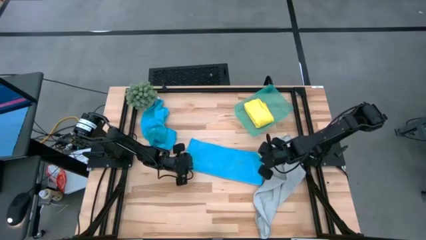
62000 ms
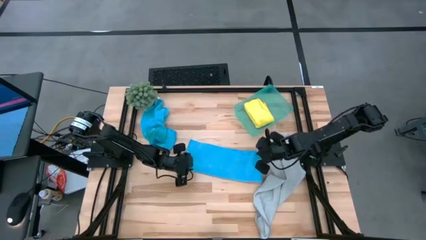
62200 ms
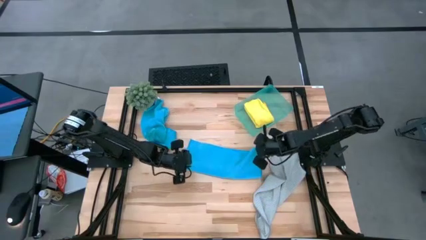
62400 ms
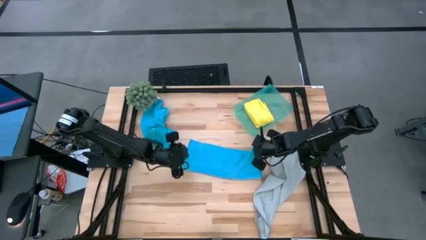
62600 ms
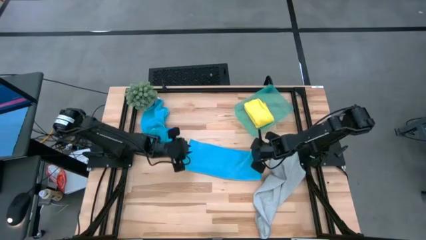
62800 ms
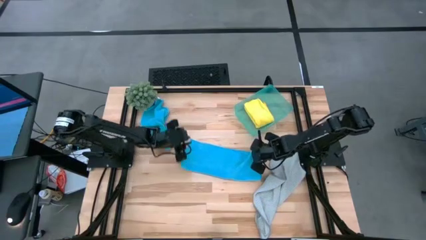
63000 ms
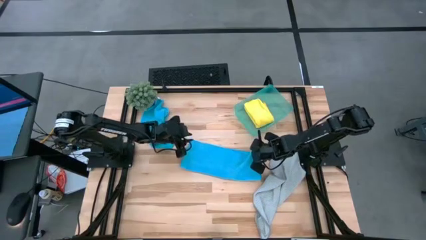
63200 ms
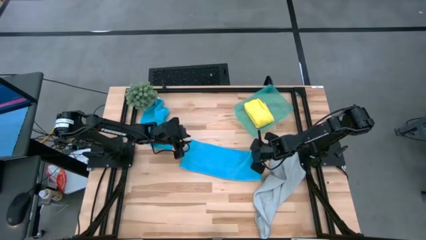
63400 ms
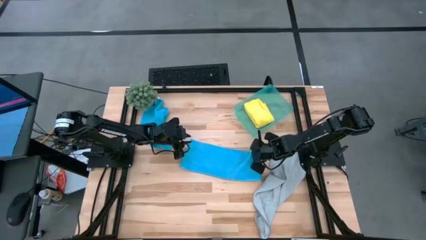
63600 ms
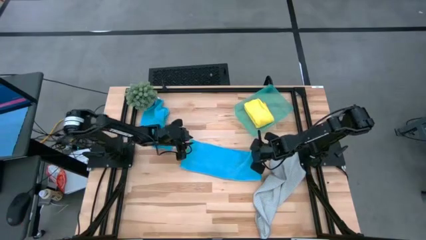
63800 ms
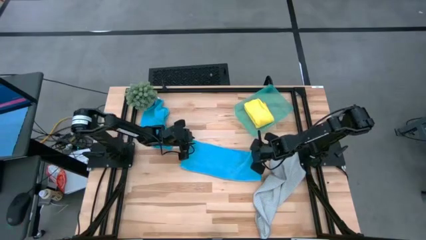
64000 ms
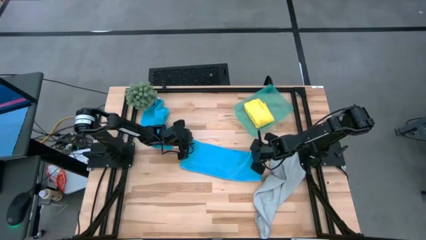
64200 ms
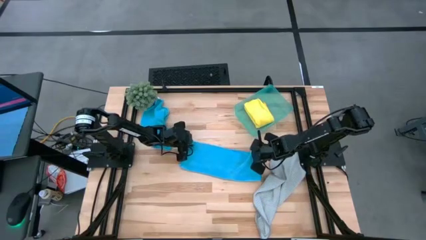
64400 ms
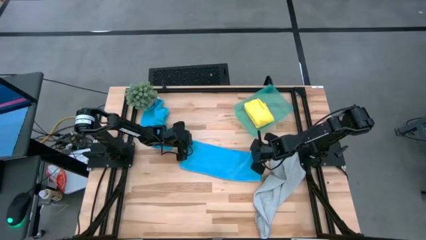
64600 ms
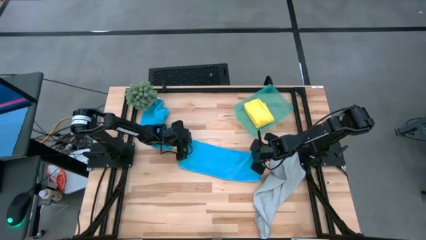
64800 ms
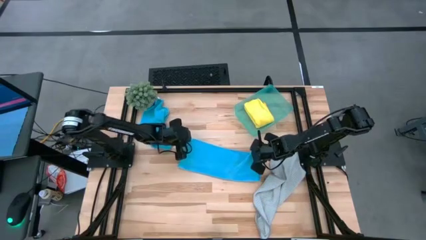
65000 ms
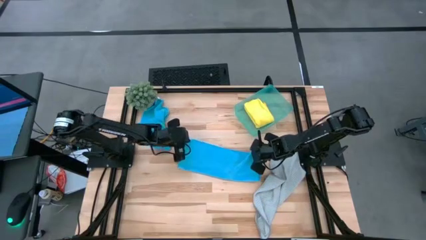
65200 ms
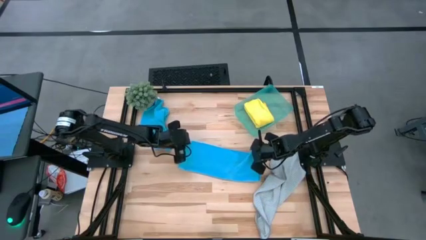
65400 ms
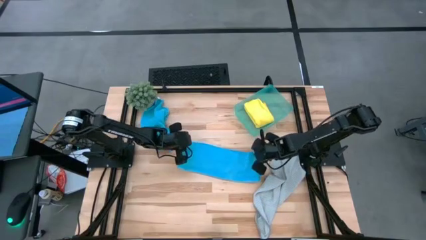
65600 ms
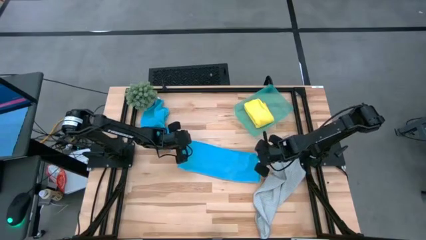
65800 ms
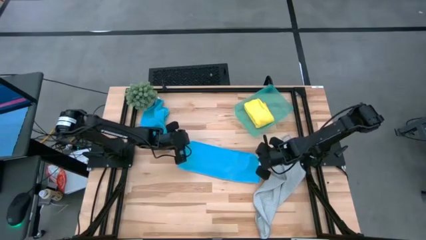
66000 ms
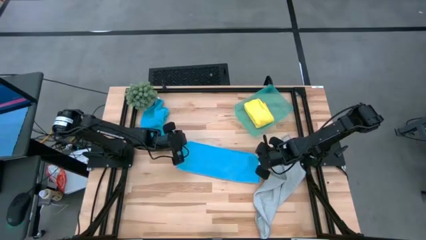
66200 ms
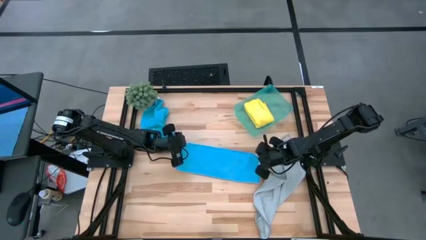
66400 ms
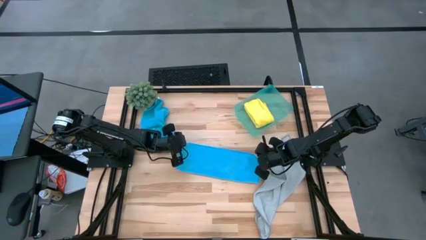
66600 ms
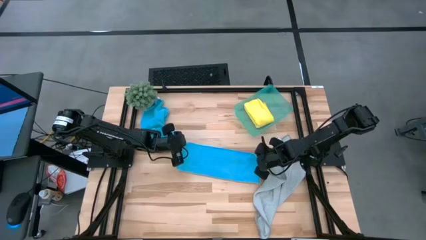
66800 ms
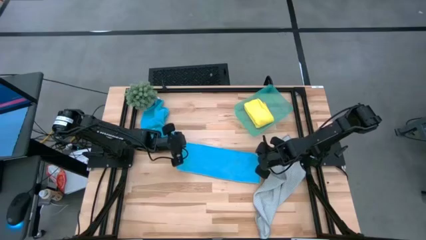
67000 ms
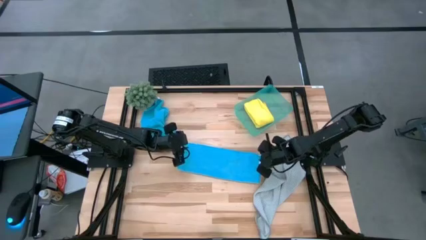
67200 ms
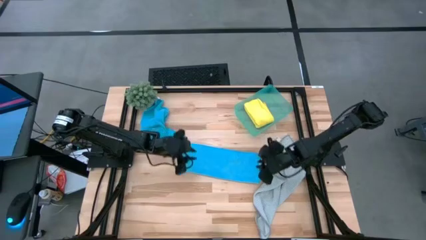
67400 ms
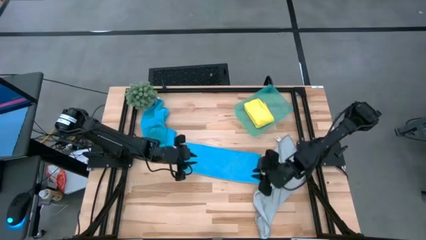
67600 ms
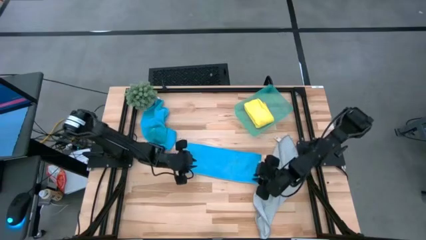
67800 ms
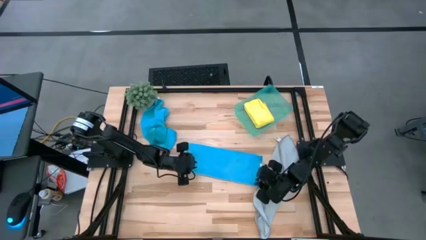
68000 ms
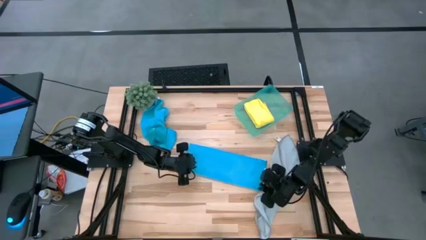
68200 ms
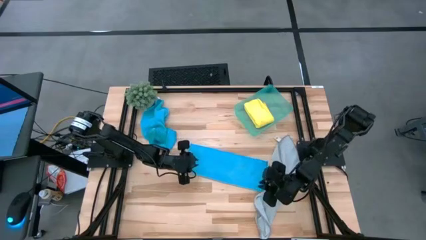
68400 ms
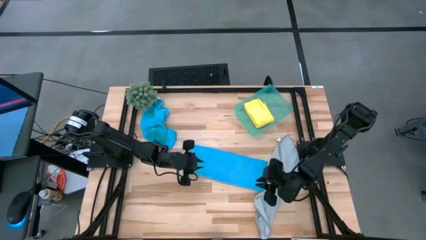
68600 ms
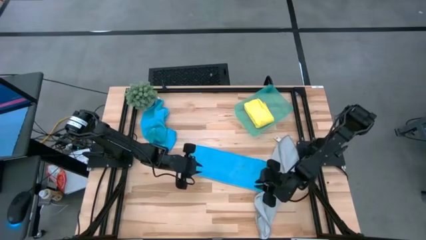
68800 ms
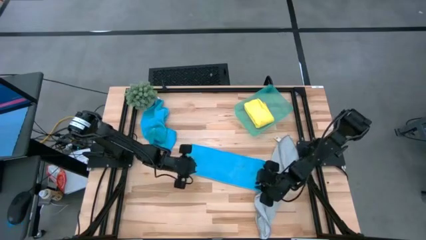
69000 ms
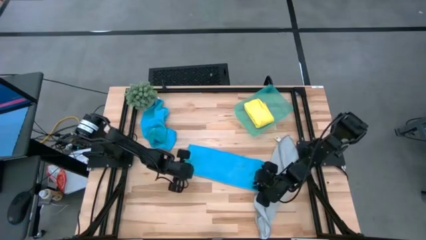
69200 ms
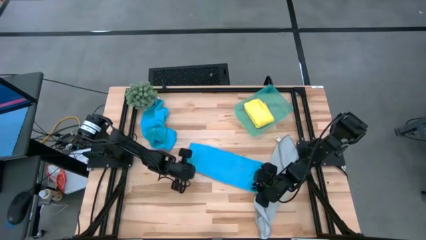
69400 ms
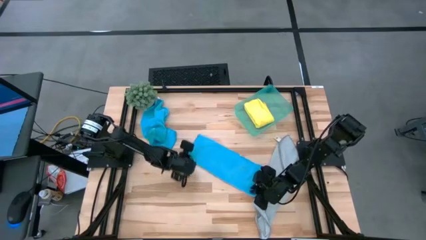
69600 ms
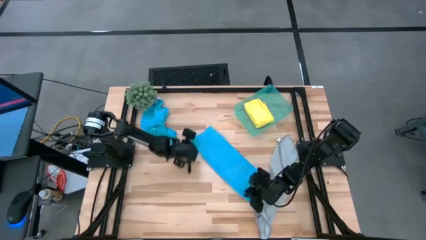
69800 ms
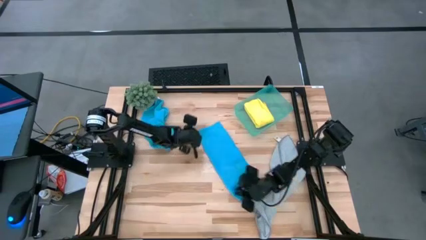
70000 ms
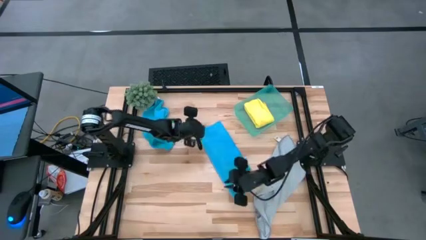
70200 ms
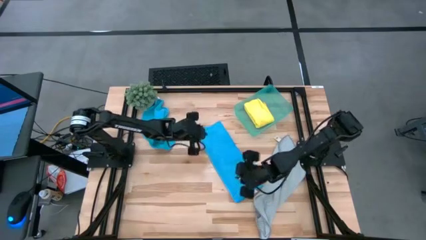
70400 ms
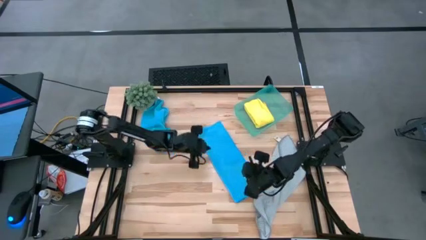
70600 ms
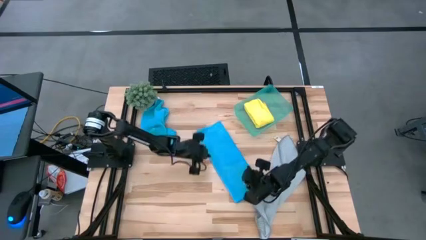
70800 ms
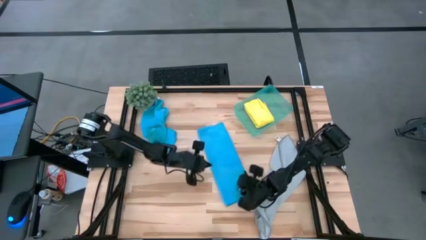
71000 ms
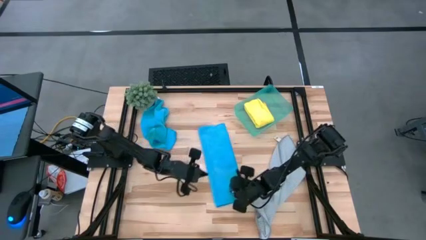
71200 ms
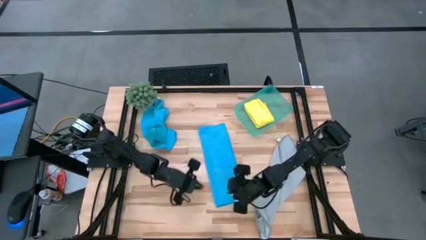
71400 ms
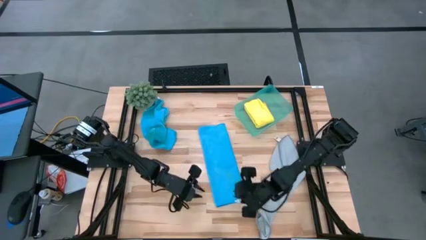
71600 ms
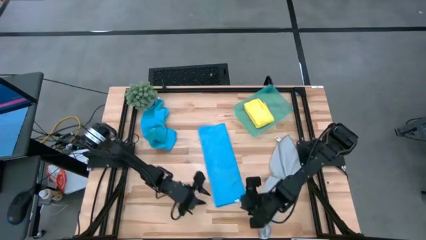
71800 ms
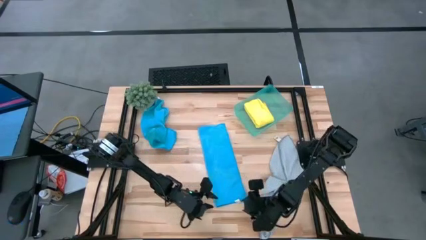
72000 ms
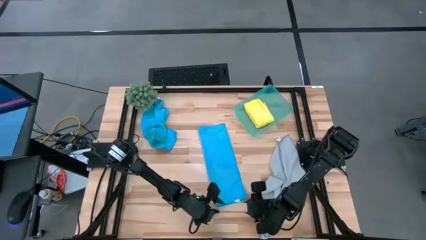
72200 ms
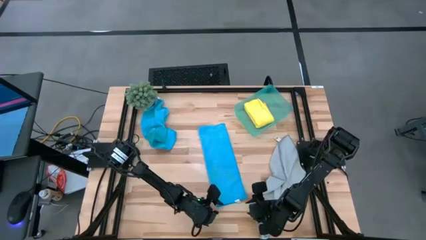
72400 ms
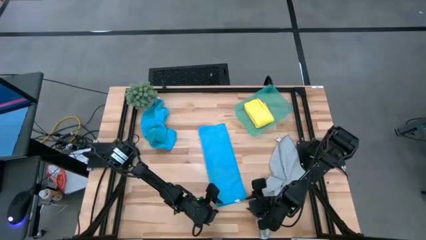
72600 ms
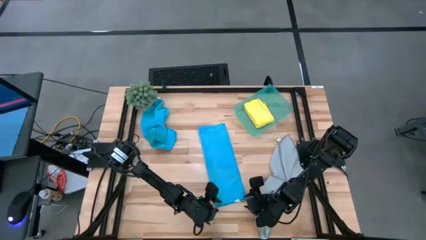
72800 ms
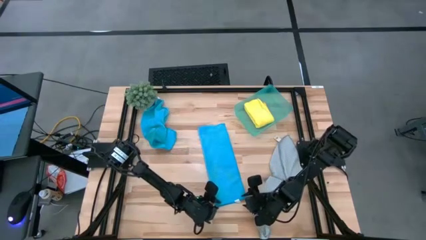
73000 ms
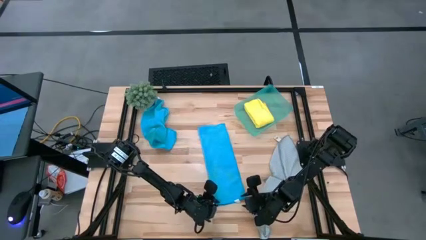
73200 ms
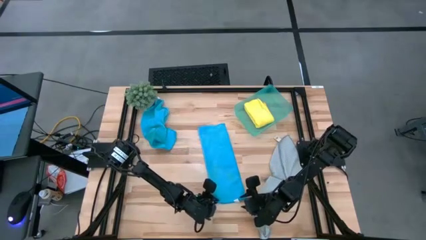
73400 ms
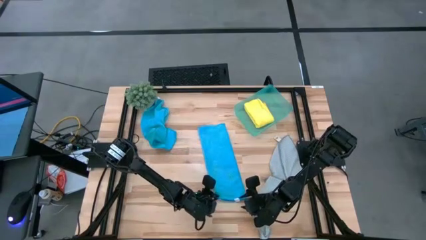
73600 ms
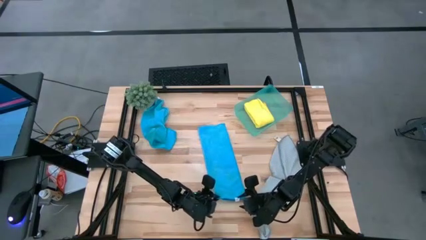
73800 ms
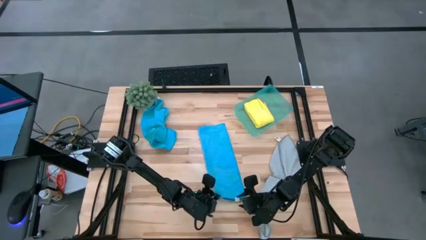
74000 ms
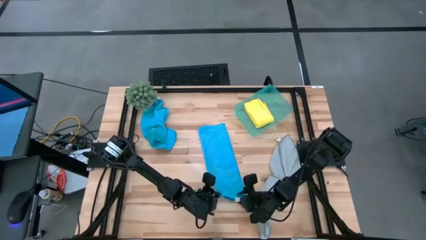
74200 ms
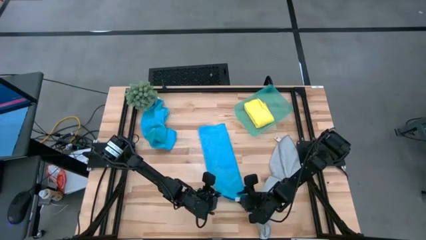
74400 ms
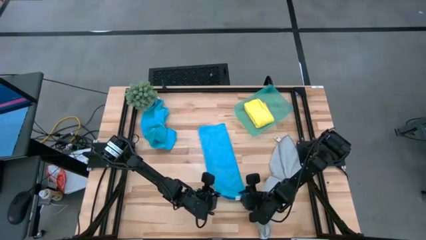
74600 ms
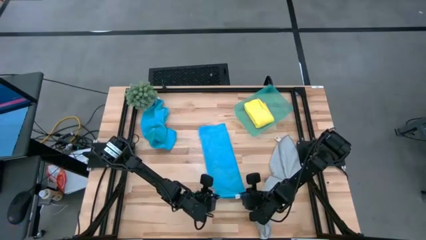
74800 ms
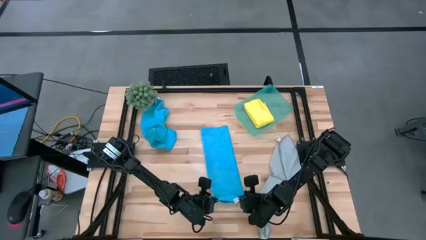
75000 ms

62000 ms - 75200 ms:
Task: Fold microfiber towels
Fold the right blue towel

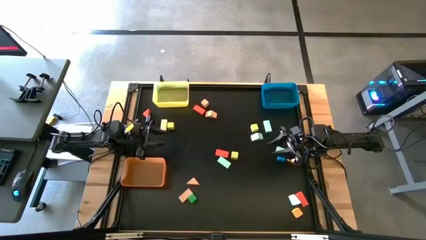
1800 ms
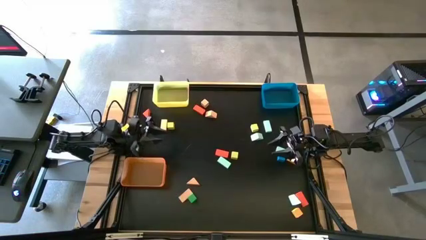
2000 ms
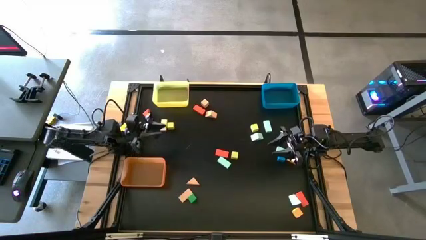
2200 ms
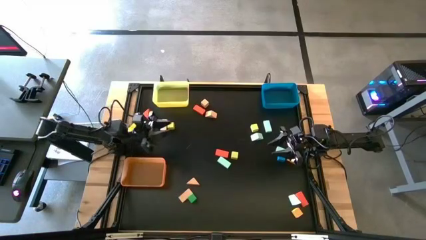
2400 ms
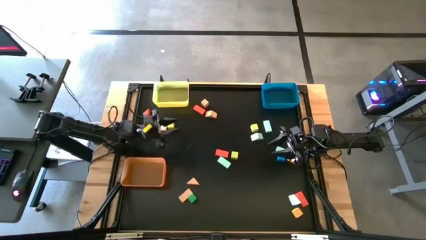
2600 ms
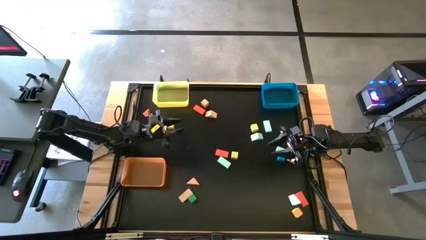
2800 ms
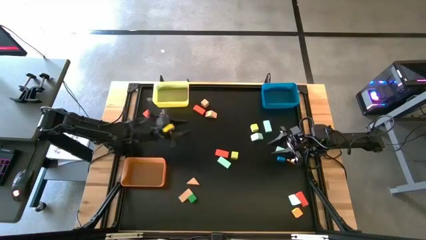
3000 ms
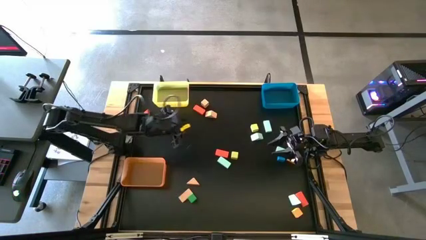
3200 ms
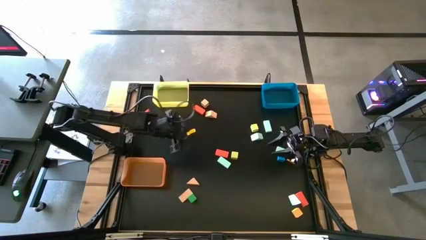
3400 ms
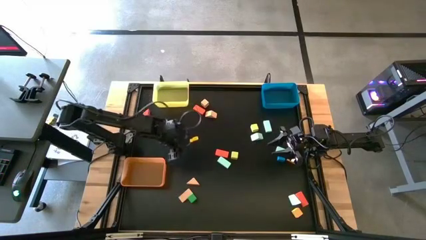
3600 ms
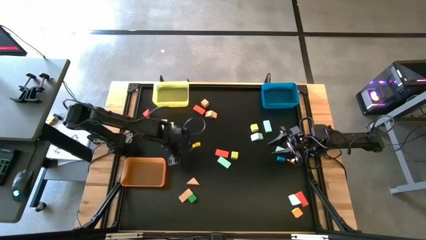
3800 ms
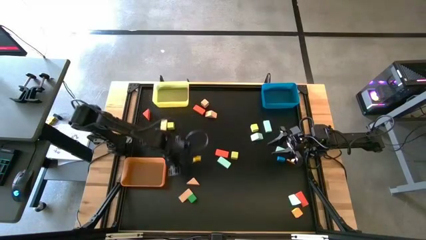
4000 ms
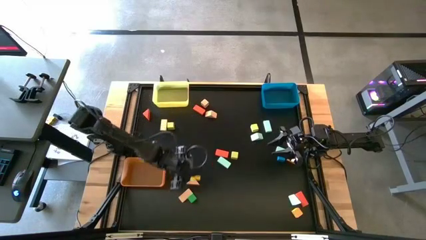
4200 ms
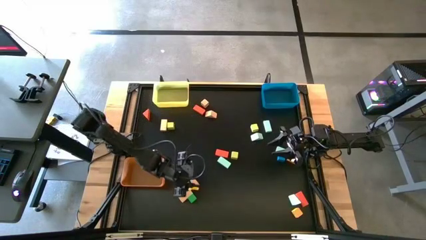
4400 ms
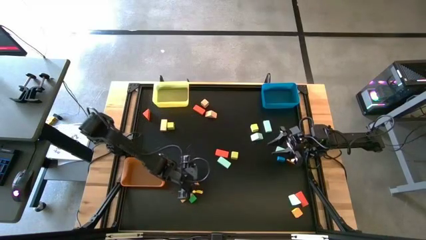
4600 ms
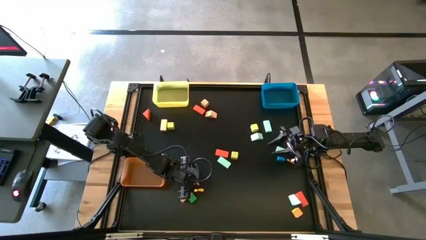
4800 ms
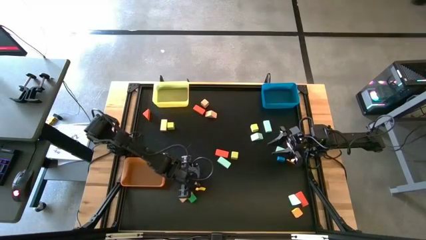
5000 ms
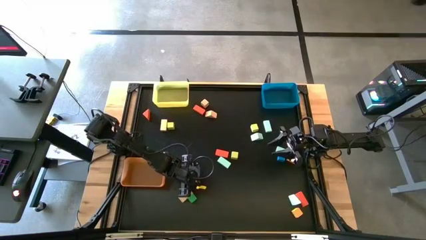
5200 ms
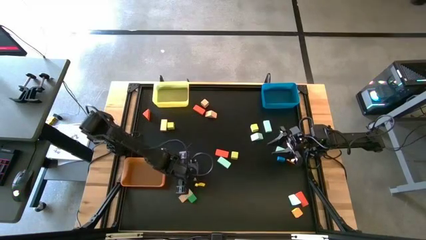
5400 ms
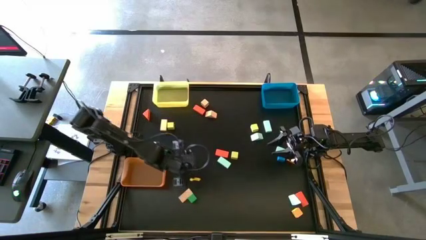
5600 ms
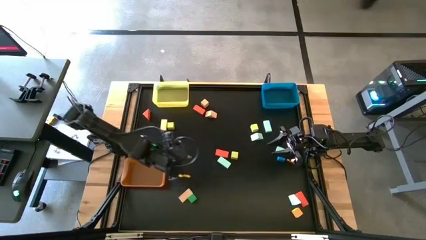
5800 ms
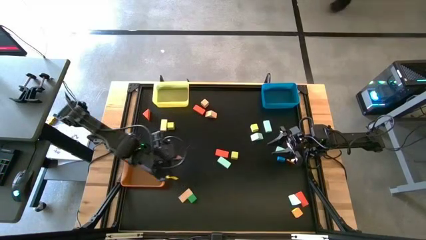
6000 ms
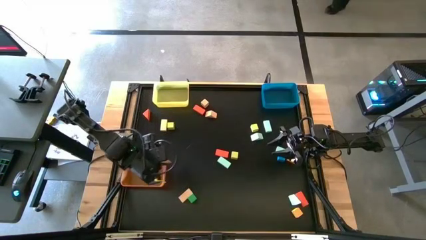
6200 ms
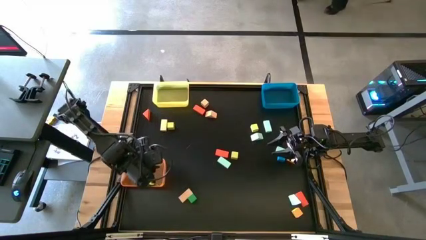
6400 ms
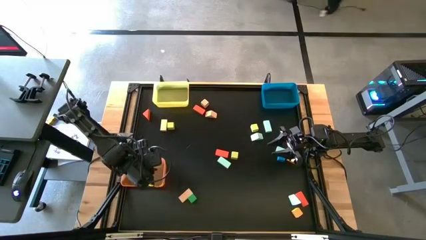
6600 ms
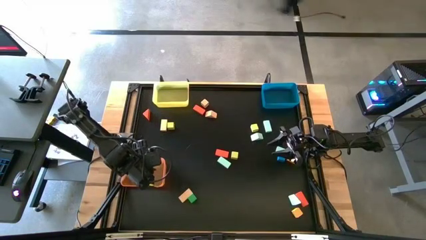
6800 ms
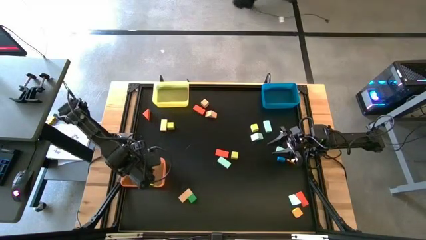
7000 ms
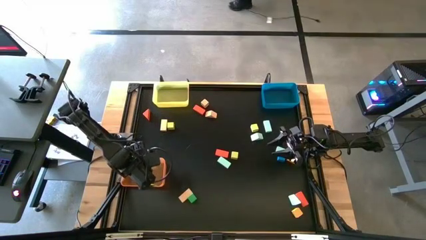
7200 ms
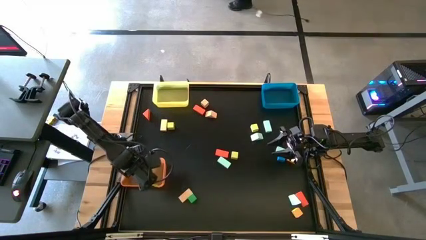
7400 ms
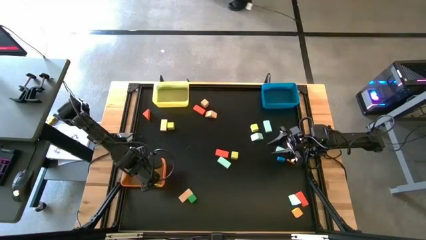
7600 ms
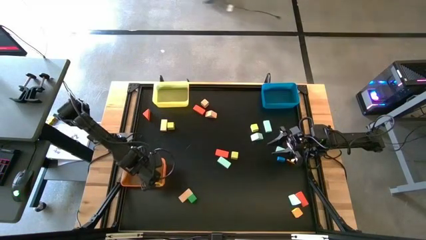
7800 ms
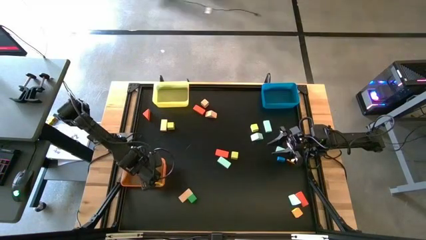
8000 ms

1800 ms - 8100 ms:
Task: Sort blocks by size
Put the brown wooden block into the orange bin
